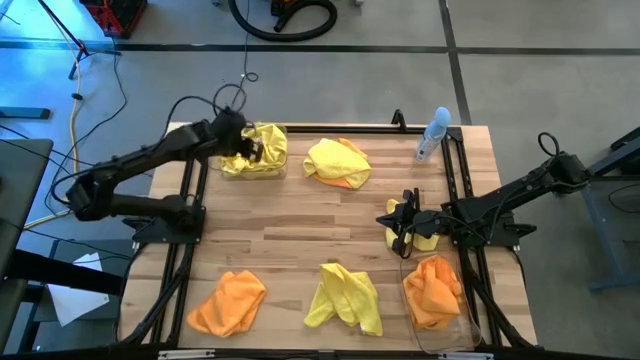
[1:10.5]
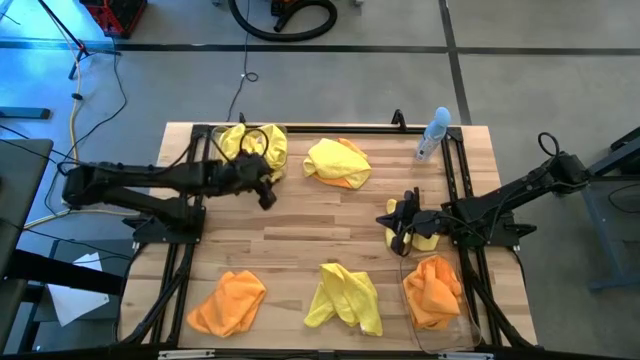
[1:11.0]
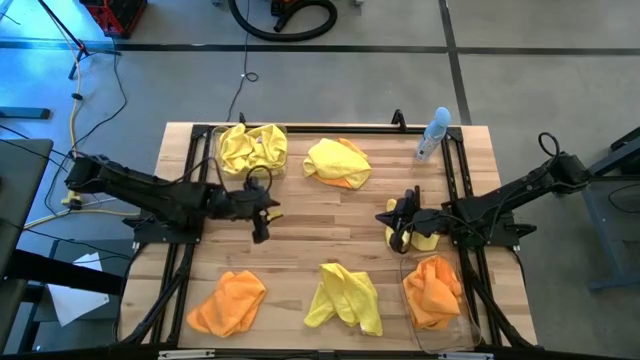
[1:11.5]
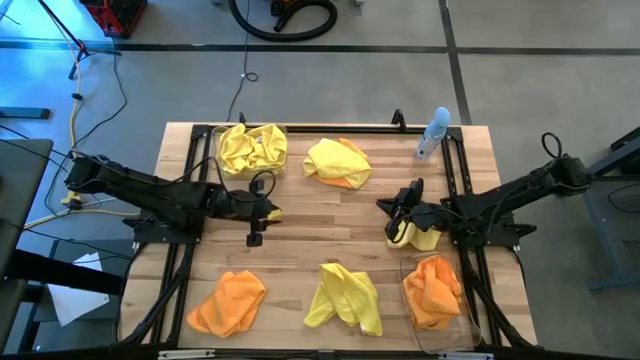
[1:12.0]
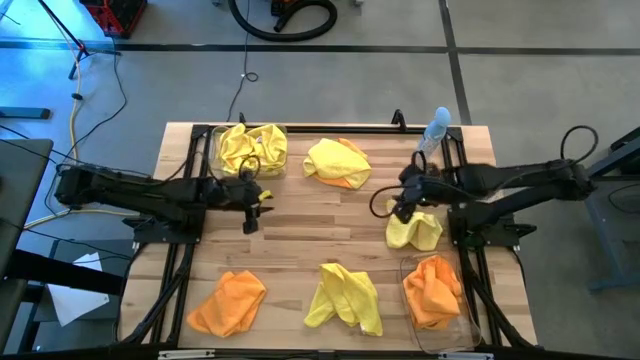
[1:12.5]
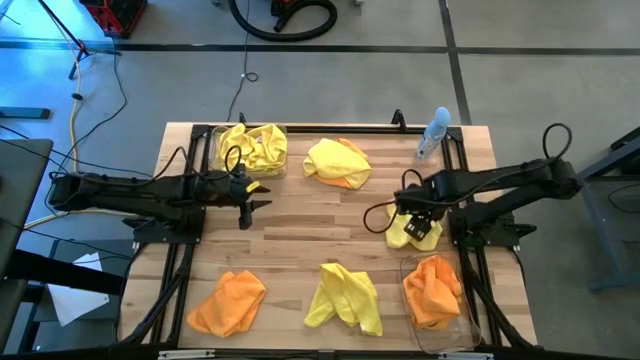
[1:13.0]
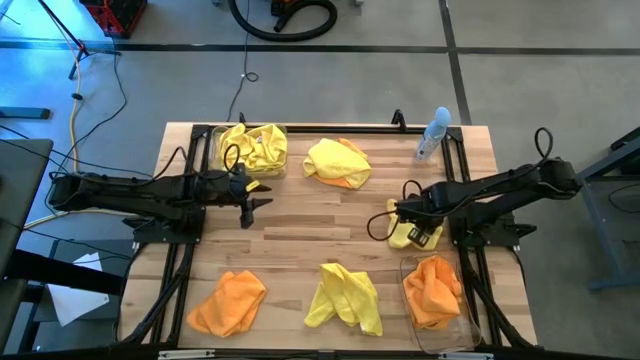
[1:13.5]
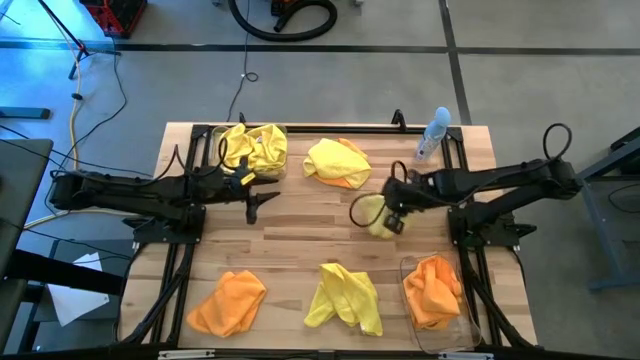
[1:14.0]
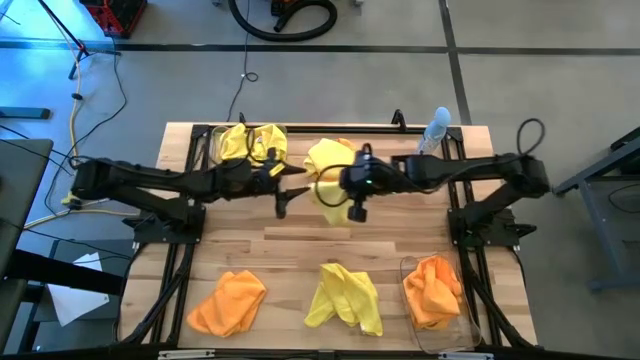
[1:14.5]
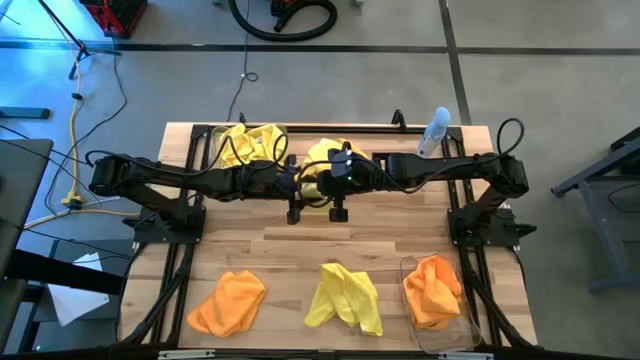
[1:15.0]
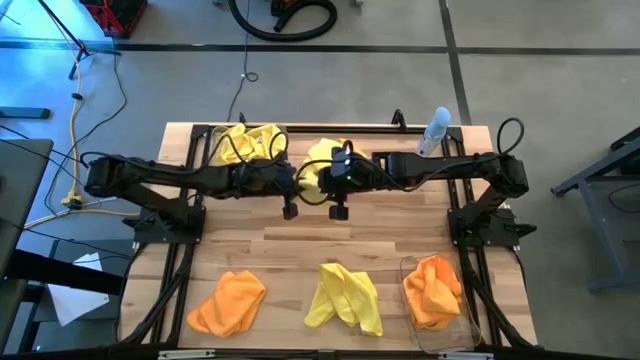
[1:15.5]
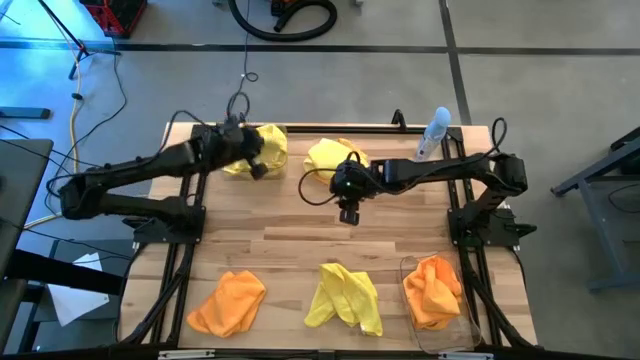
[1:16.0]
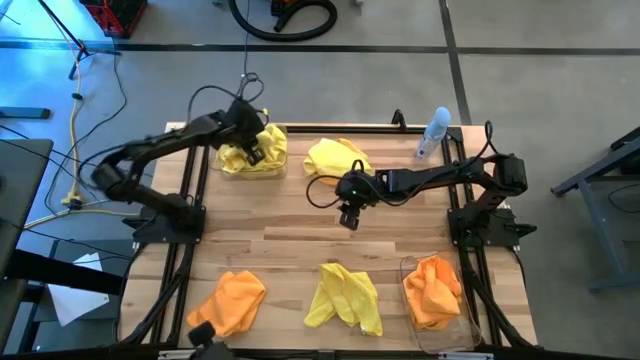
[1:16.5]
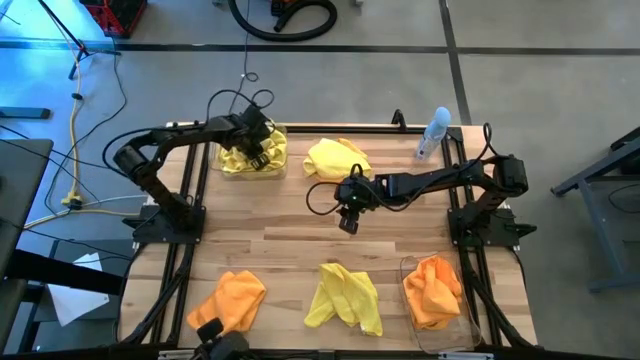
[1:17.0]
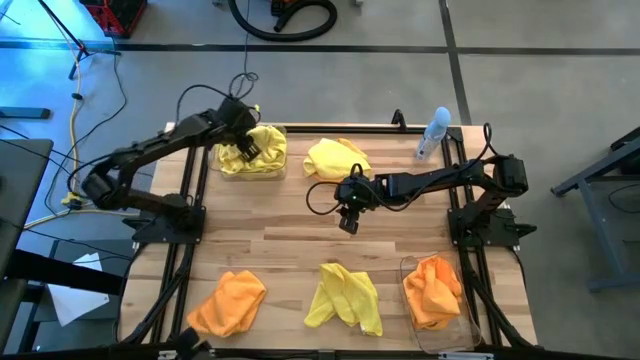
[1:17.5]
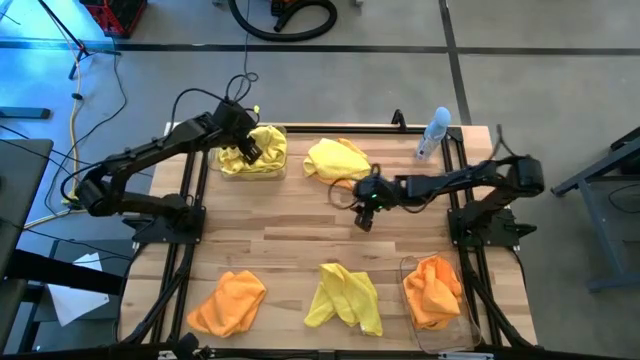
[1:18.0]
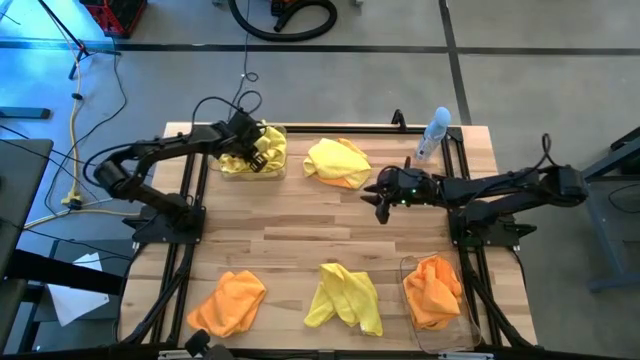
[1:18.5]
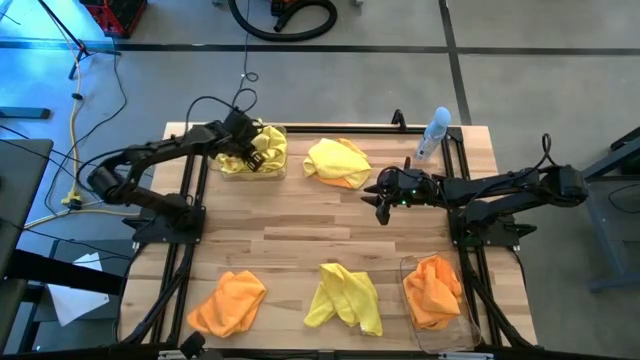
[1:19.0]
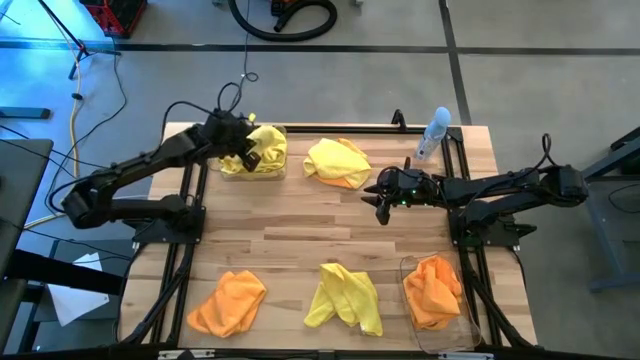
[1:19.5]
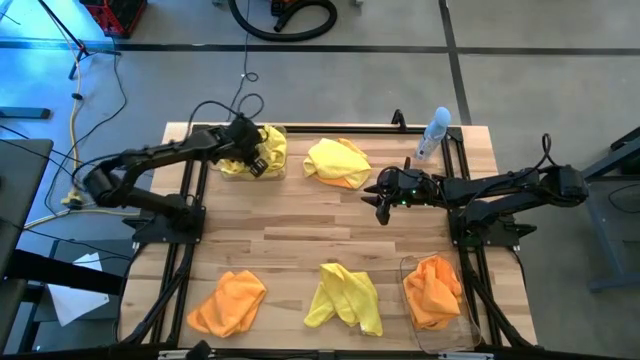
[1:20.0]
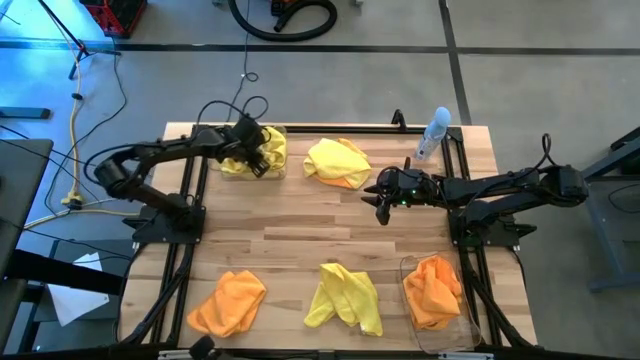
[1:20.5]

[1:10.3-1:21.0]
Task: Sort microfiber towel by color & place in baskets
Put the yellow towel into the top transparent bin

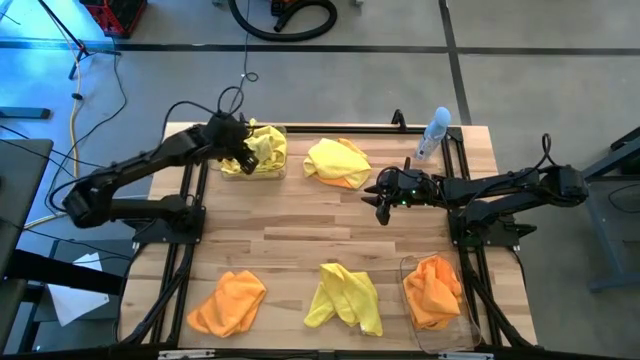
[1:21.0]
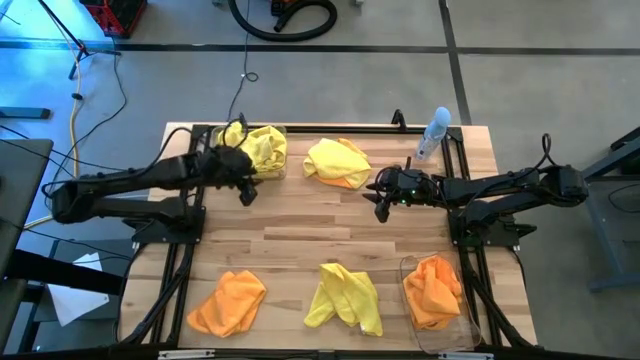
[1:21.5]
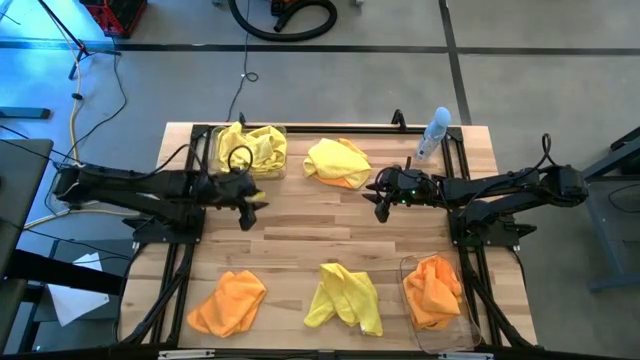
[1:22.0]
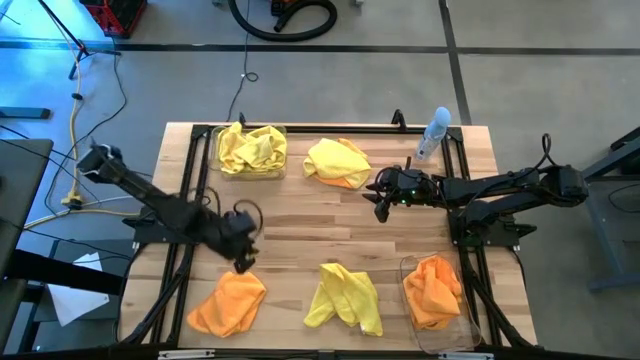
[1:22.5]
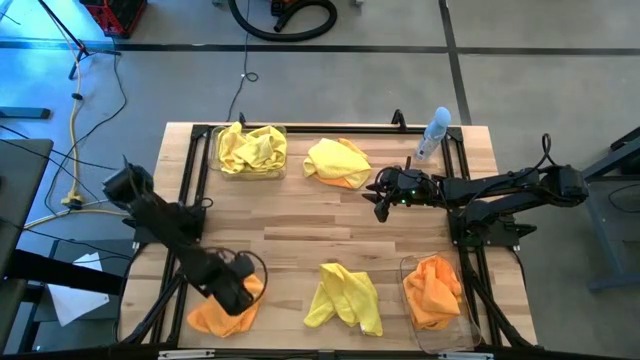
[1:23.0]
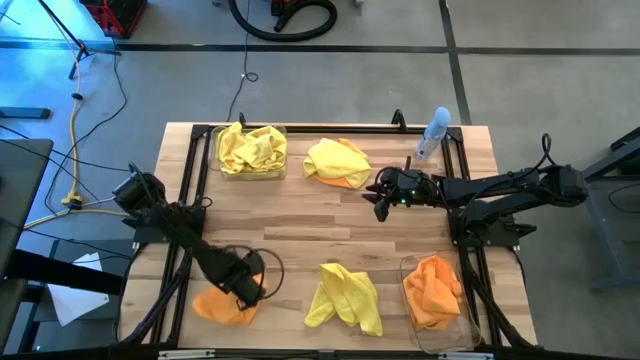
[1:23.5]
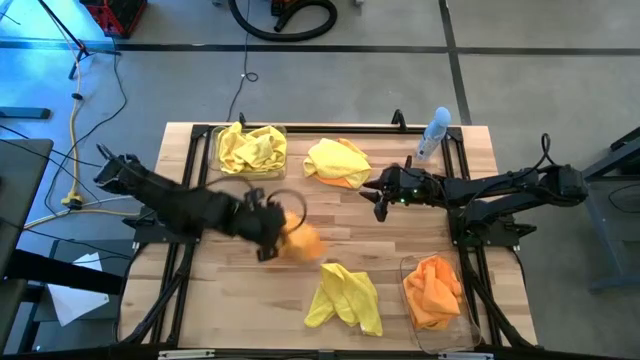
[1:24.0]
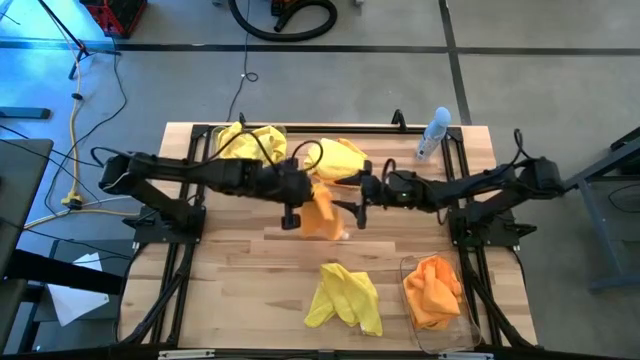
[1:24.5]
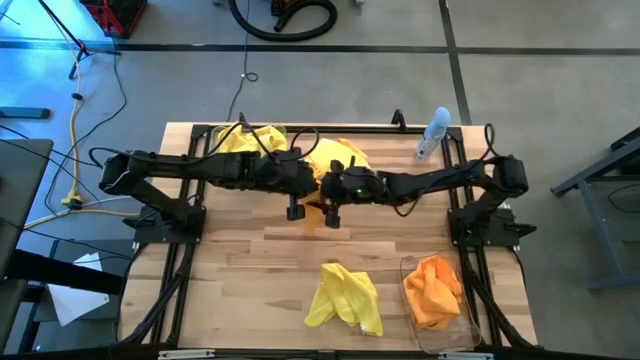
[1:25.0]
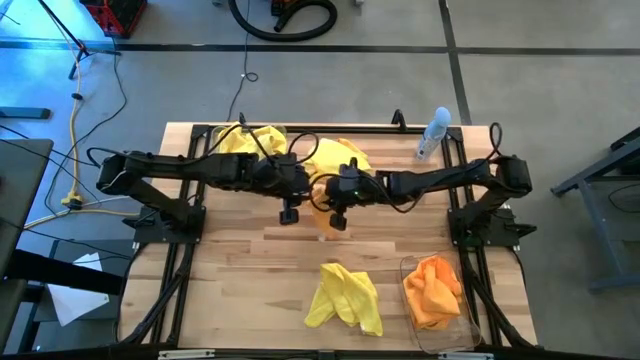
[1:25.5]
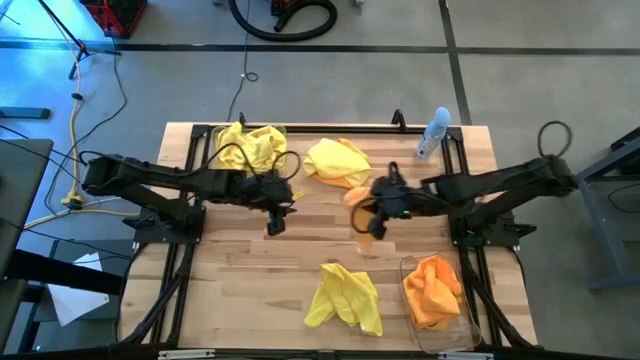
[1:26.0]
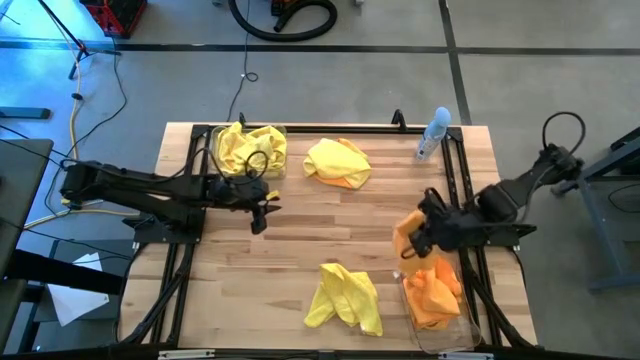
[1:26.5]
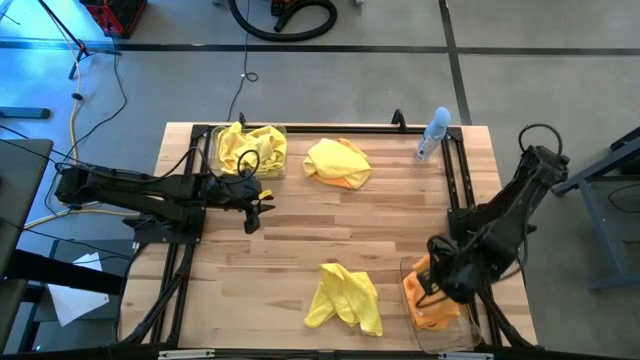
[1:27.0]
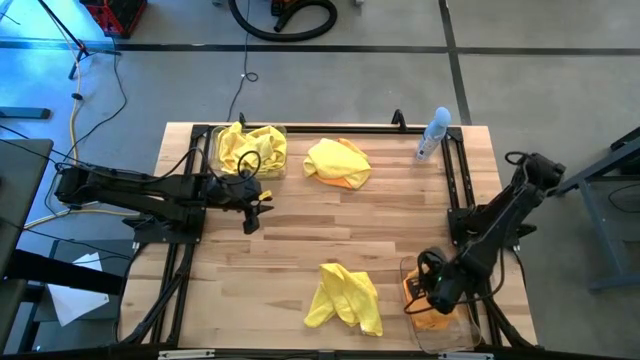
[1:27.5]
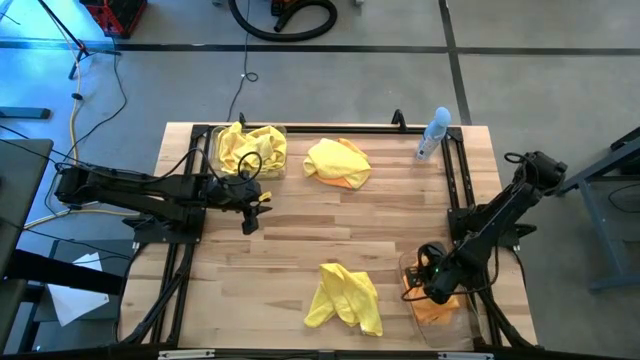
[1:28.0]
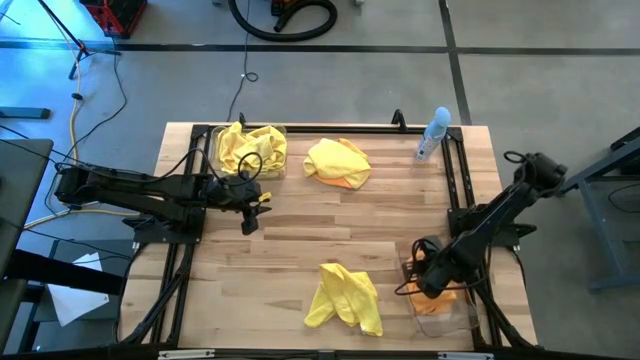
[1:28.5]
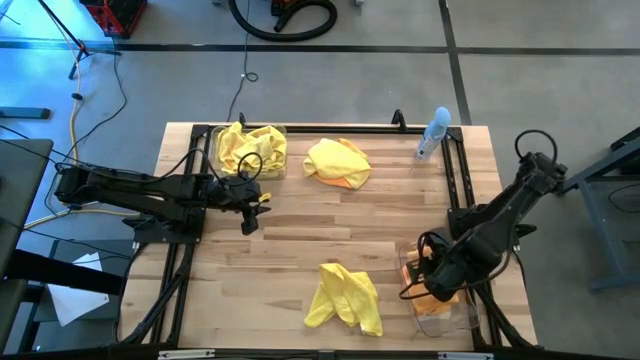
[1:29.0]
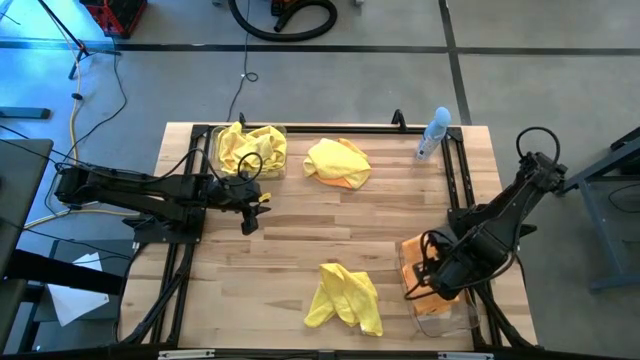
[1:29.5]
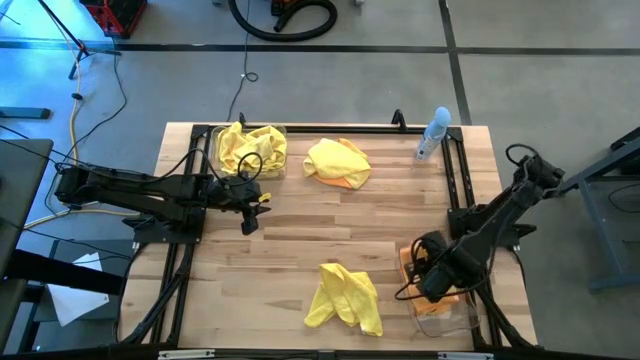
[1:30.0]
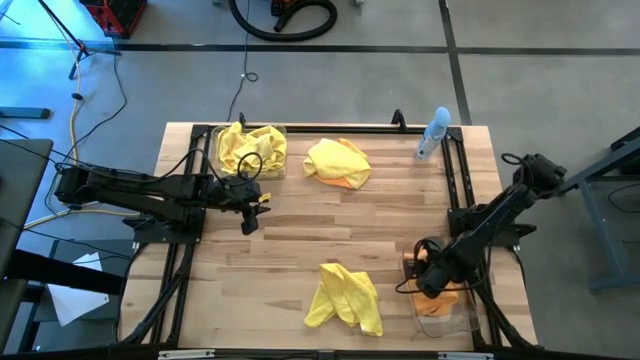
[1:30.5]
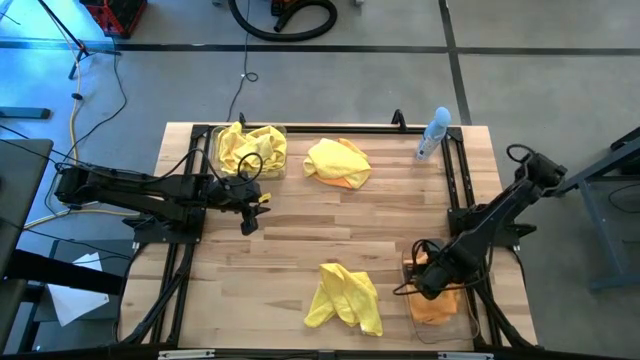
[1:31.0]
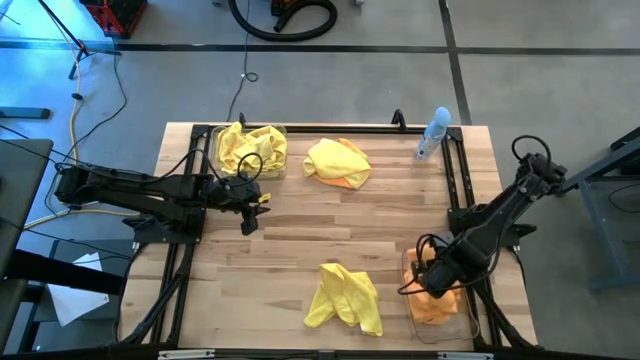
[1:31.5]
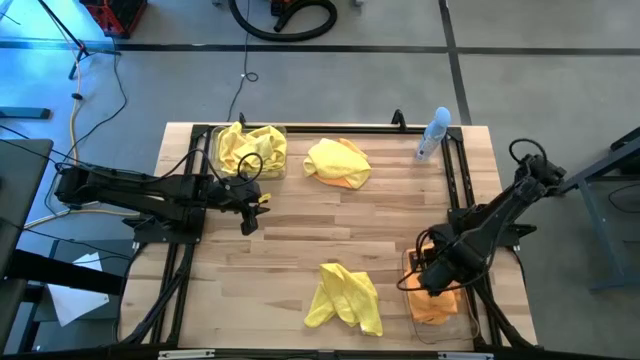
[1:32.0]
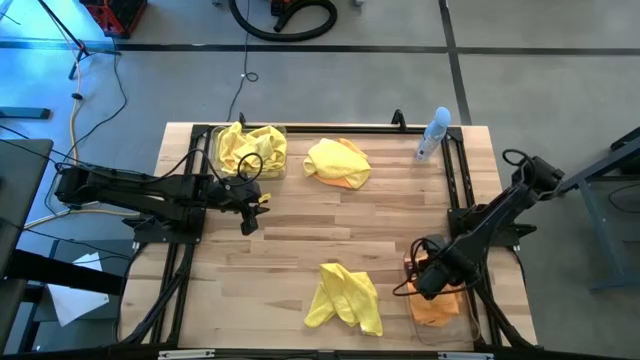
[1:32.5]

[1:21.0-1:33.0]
Put the orange towel into the bottom transparent bin
